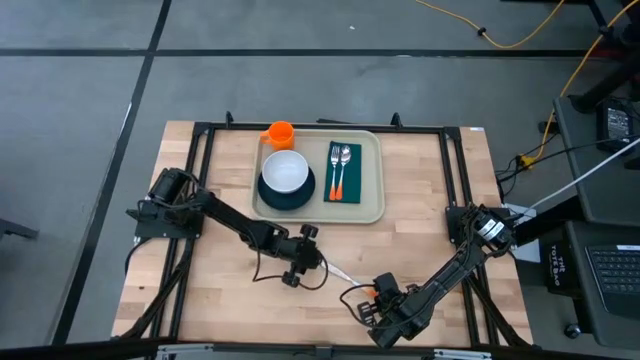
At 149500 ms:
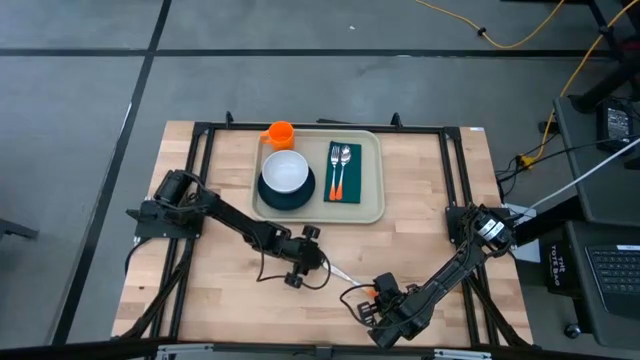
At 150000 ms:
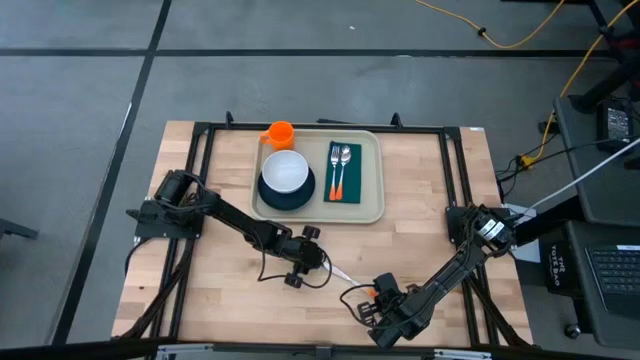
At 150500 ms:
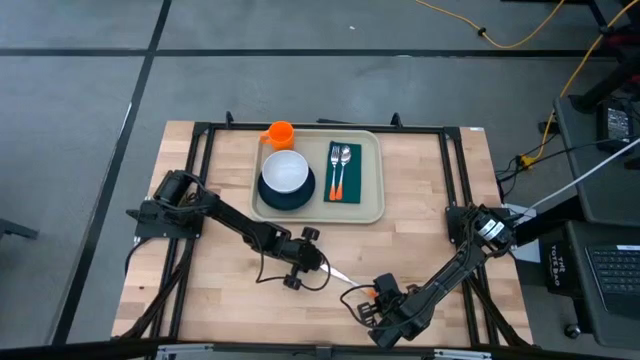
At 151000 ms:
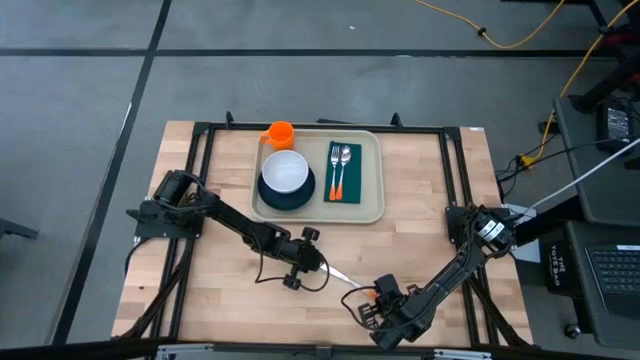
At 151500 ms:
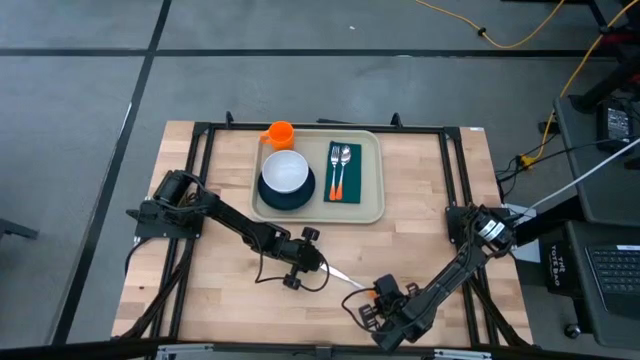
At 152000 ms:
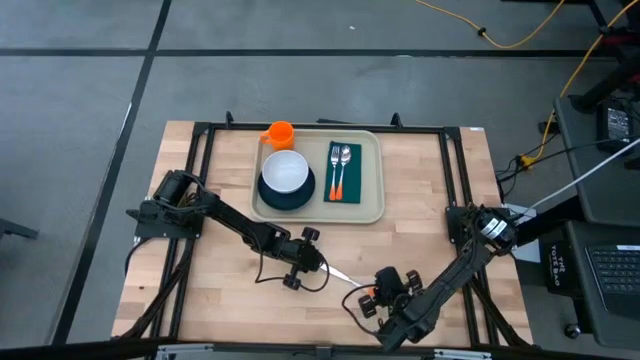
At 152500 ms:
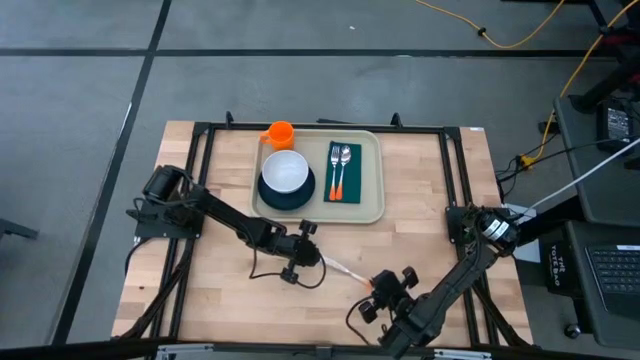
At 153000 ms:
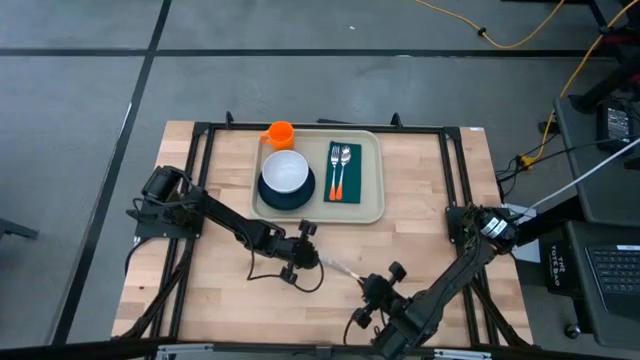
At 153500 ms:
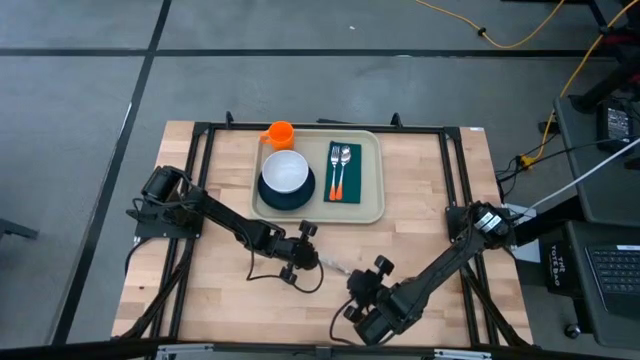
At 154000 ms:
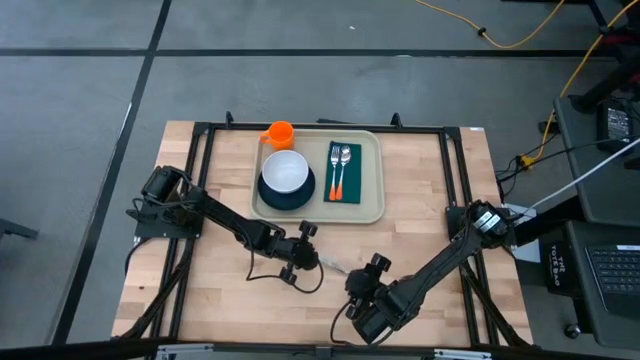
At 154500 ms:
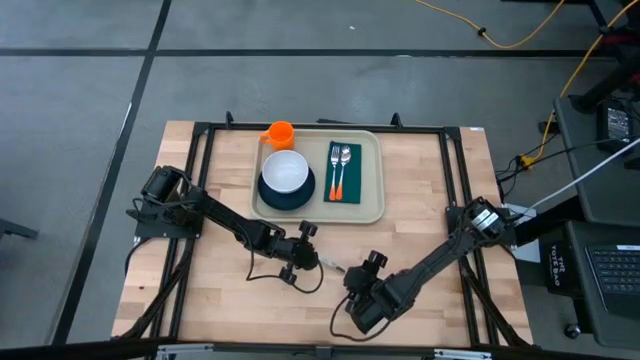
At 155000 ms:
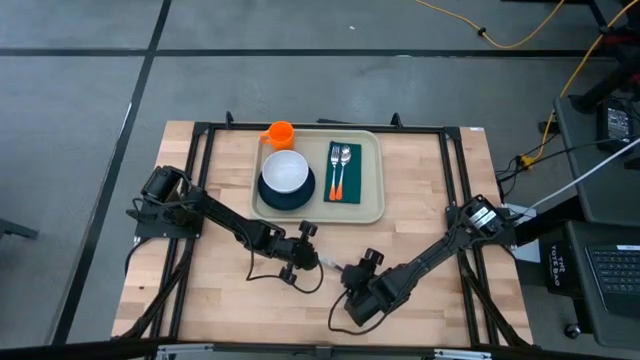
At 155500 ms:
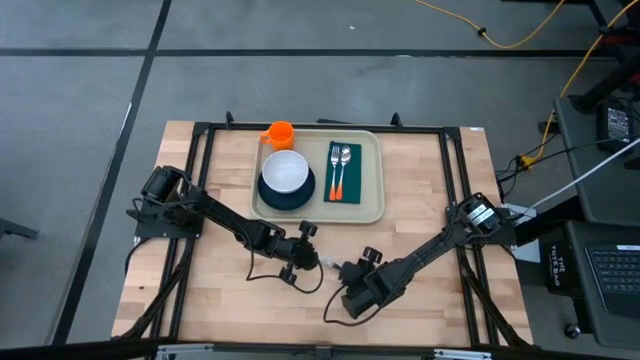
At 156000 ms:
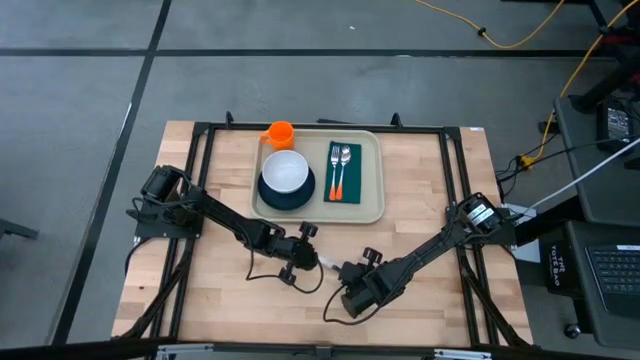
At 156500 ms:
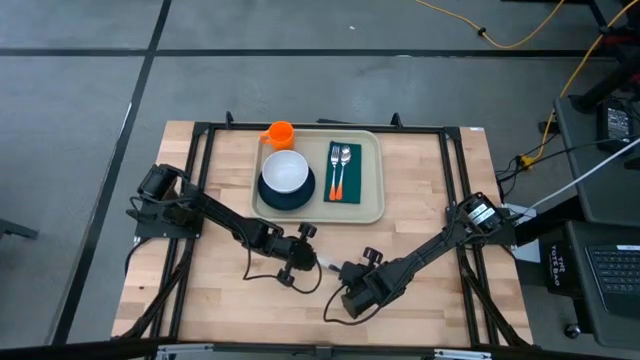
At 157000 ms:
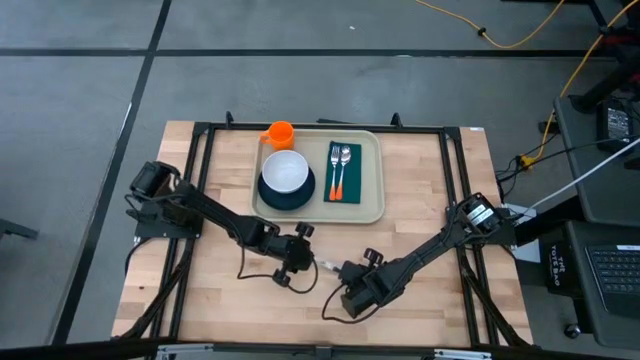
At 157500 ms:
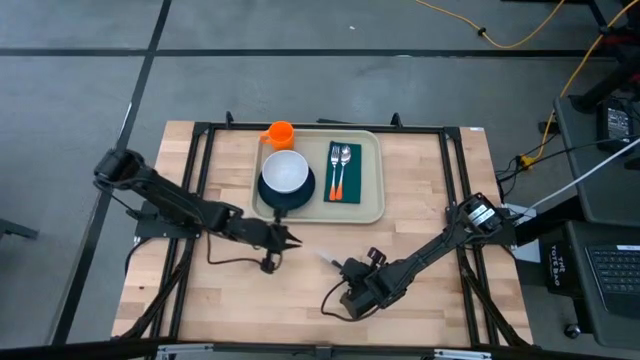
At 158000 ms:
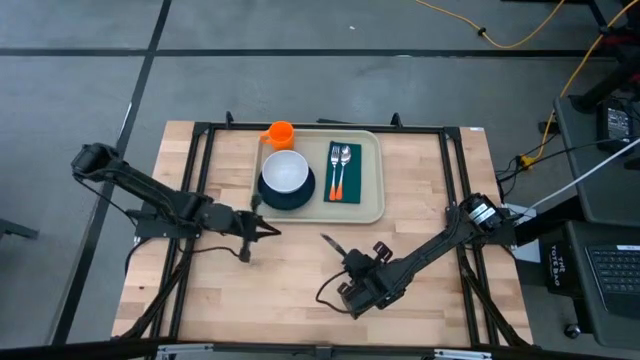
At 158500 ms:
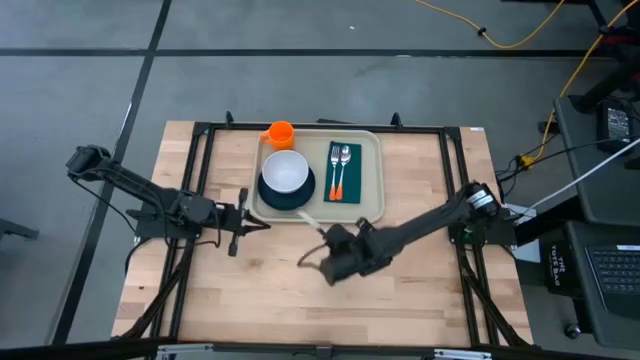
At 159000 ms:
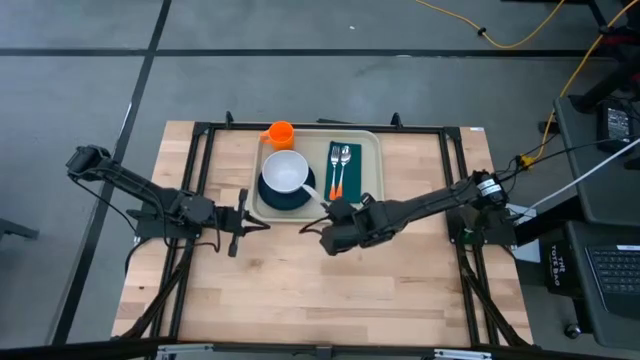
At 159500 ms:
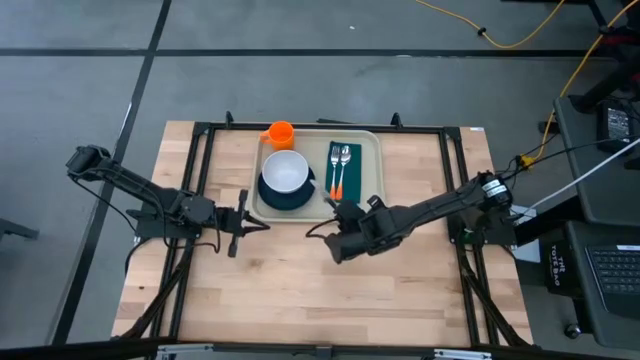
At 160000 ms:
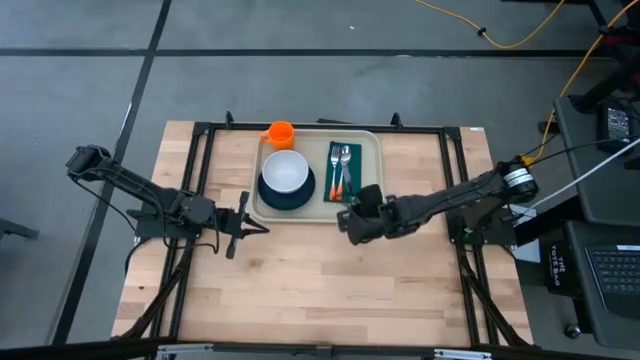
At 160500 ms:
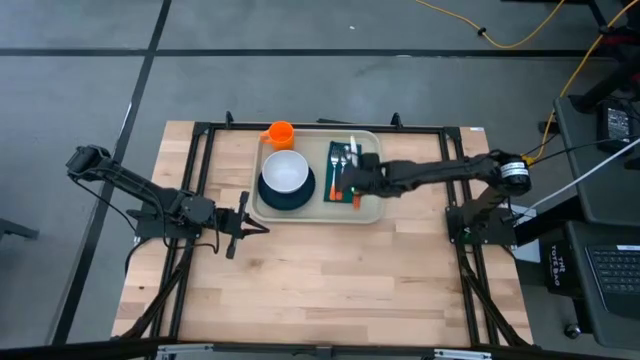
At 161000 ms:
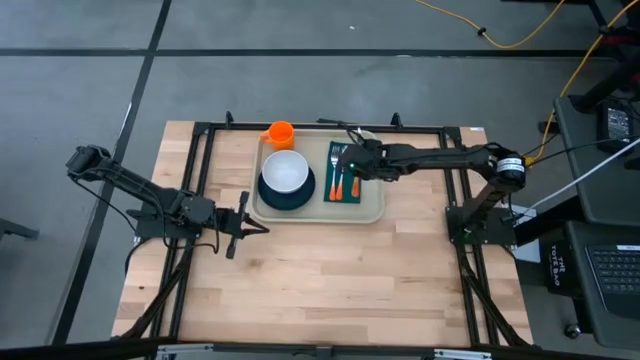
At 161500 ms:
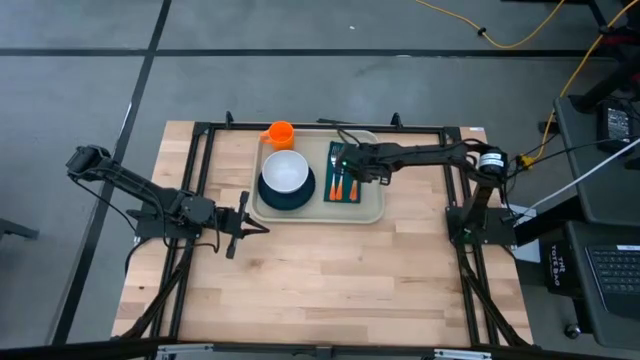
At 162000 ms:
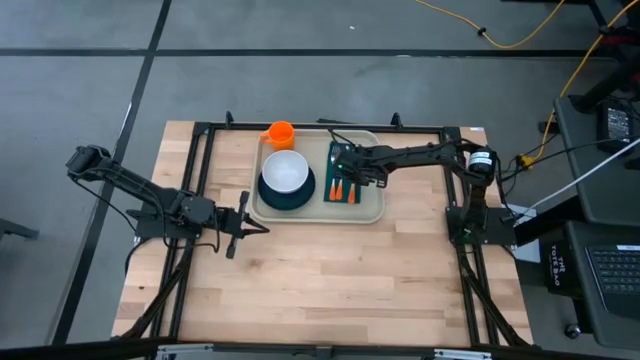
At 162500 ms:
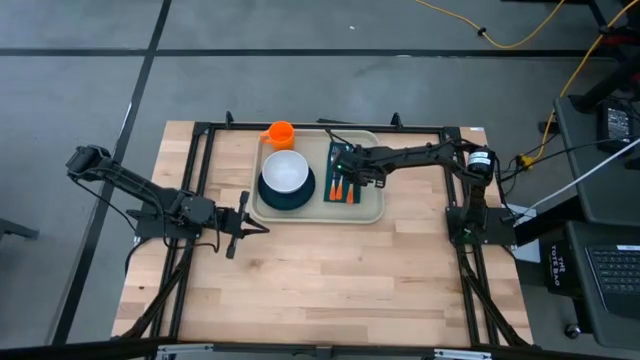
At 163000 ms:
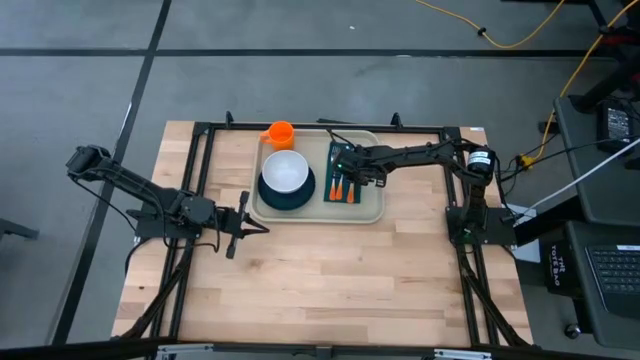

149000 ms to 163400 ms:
Task: Set up tray
Put the orange table knife on top of the green table napkin on the brown serving tray to the right of the orange spoon

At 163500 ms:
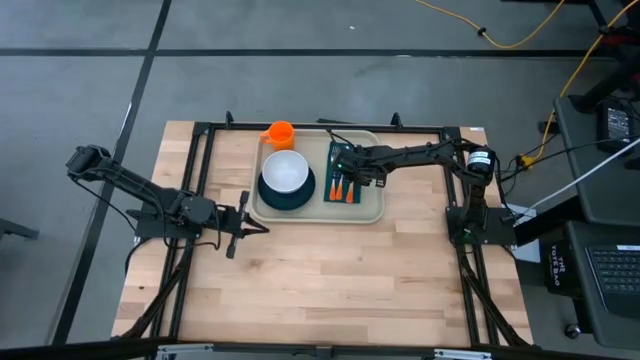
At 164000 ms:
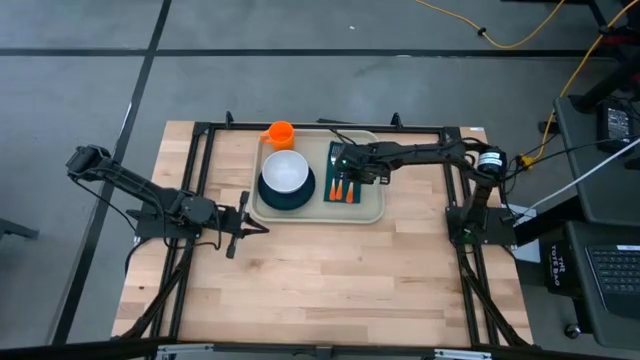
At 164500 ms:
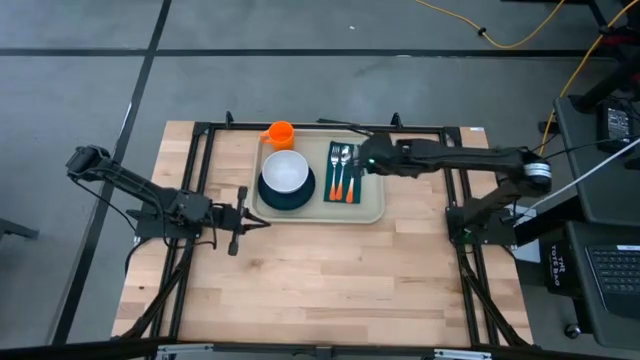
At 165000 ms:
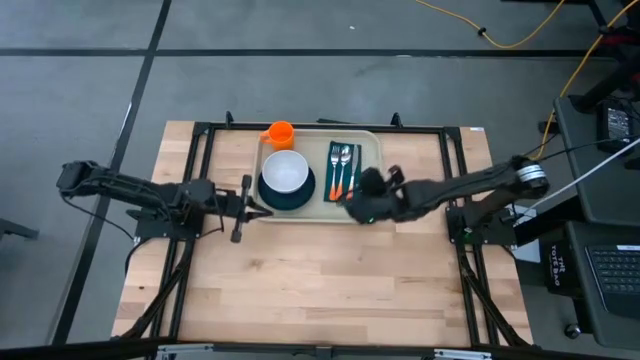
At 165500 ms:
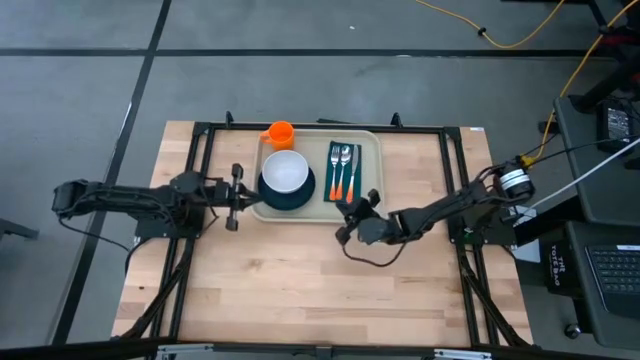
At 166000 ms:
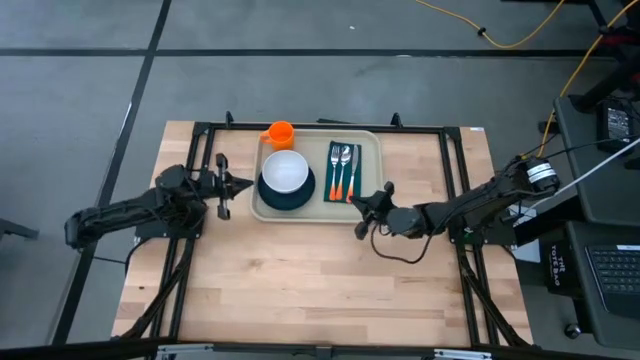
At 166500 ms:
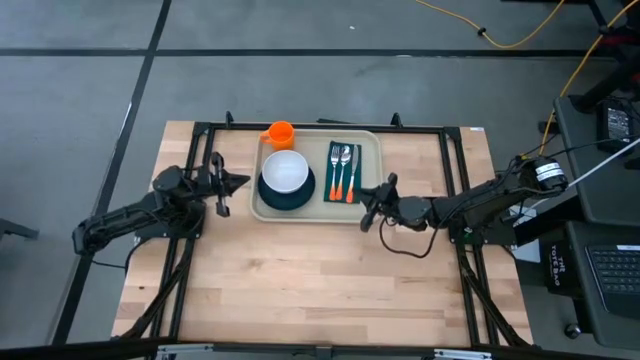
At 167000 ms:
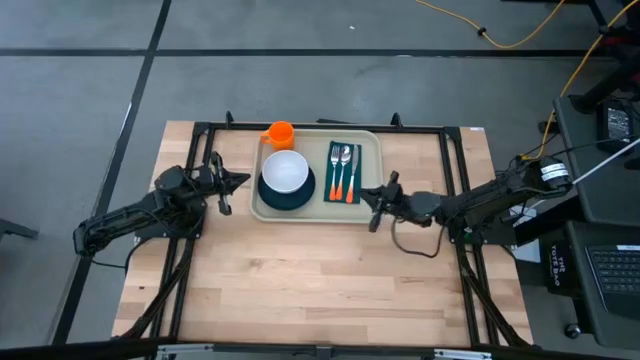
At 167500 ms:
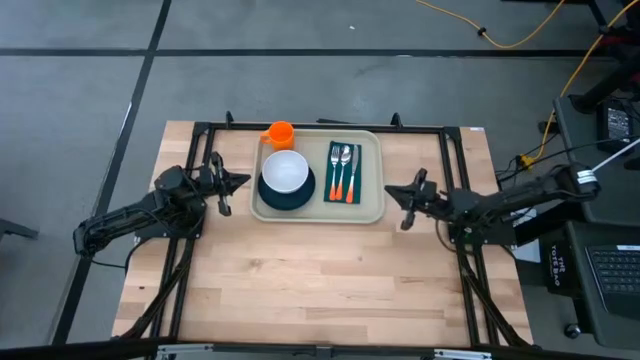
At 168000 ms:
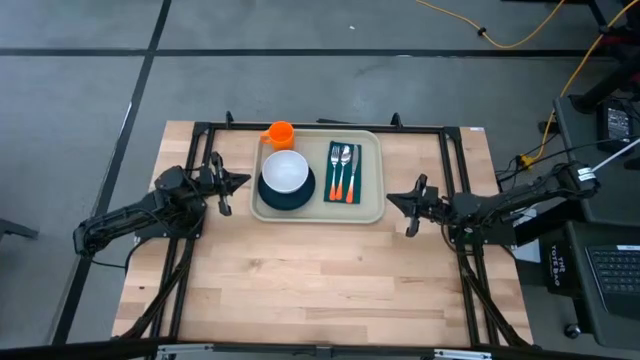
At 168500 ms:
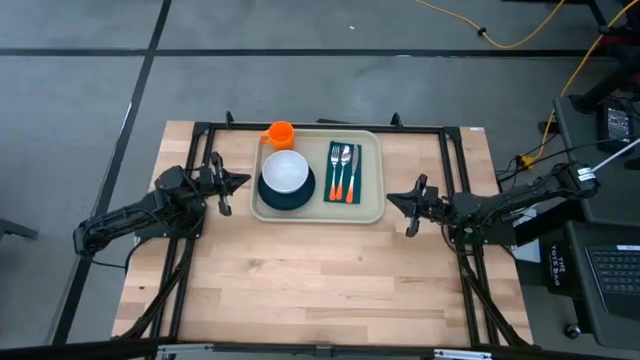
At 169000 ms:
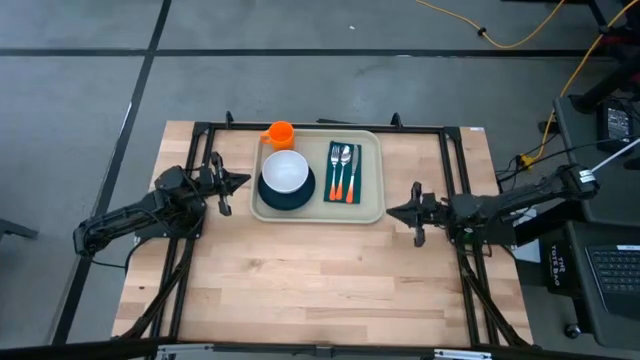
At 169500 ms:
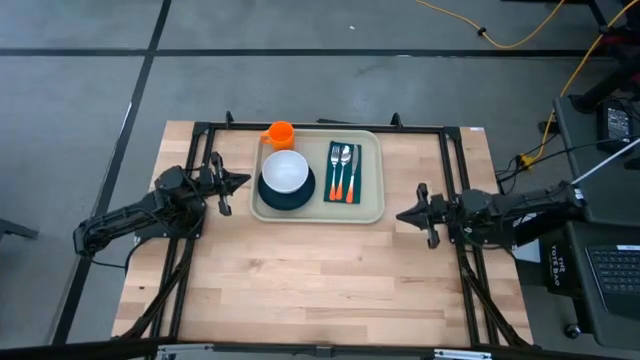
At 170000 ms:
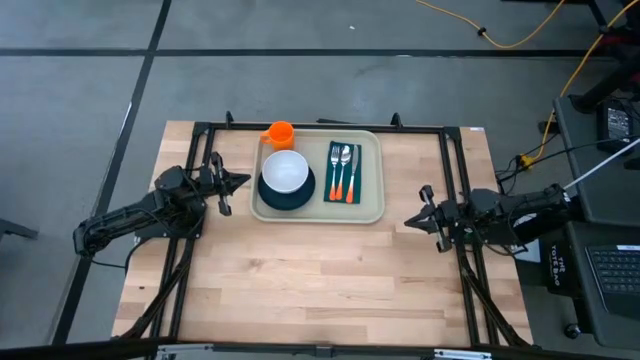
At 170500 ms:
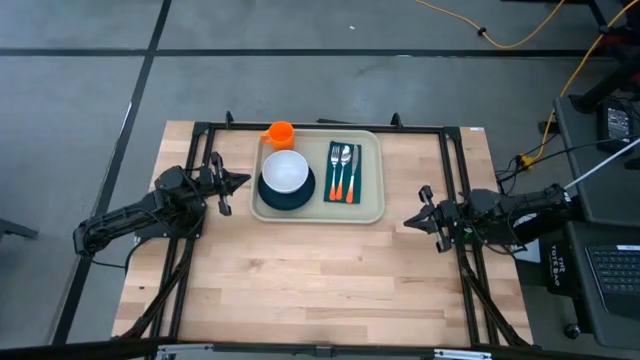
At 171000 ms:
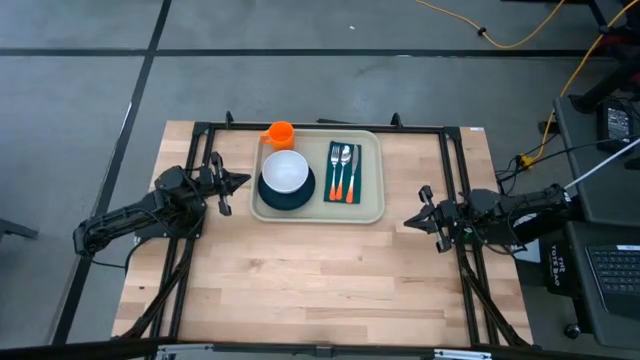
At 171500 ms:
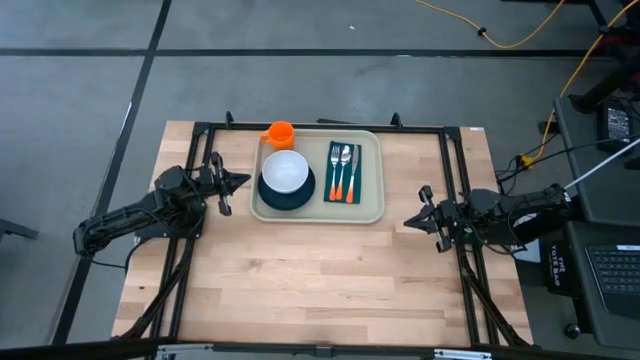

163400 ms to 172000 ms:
Return to Home Position
